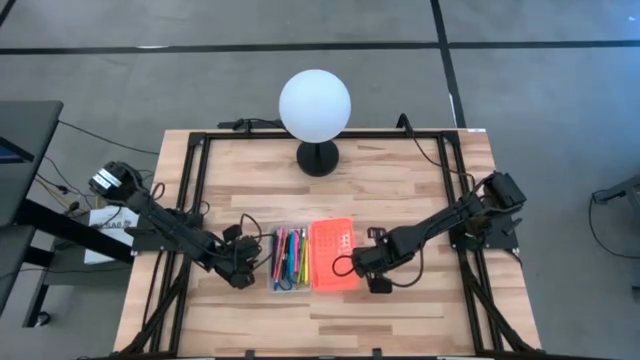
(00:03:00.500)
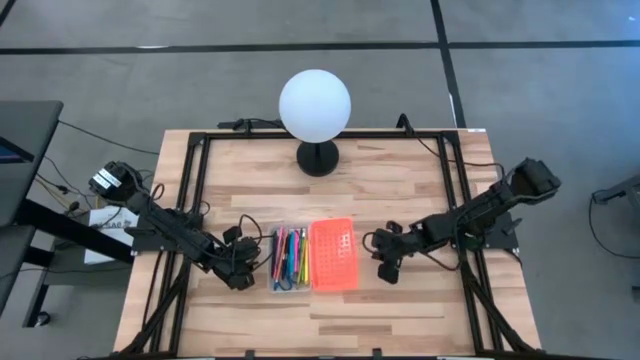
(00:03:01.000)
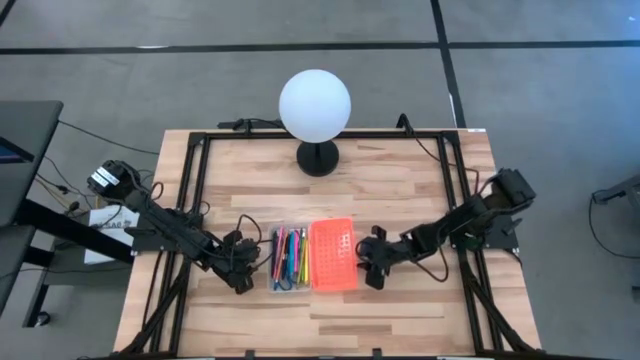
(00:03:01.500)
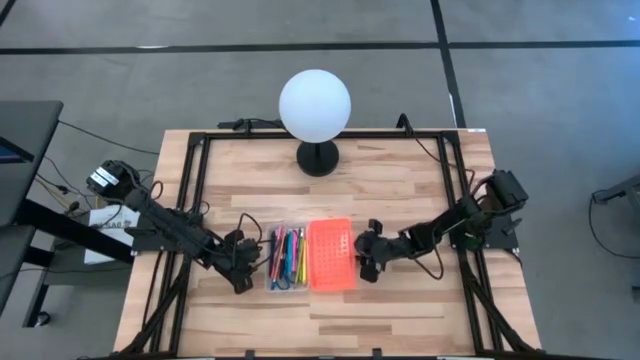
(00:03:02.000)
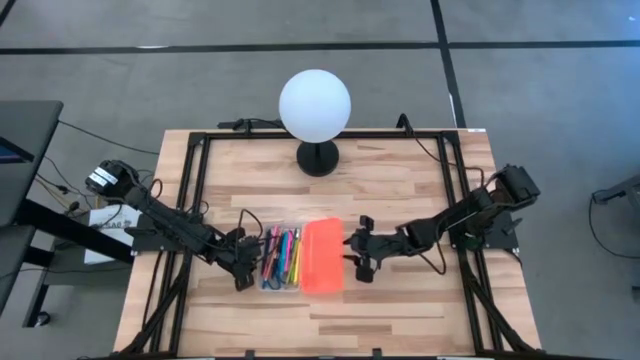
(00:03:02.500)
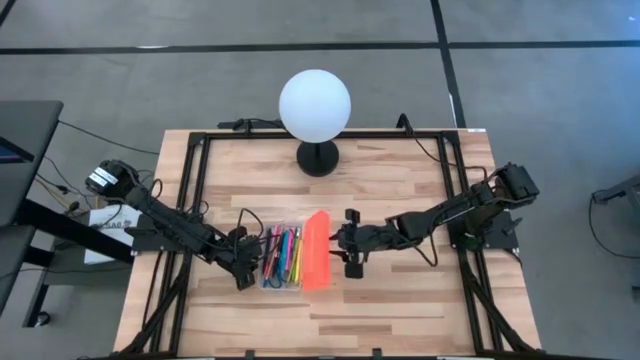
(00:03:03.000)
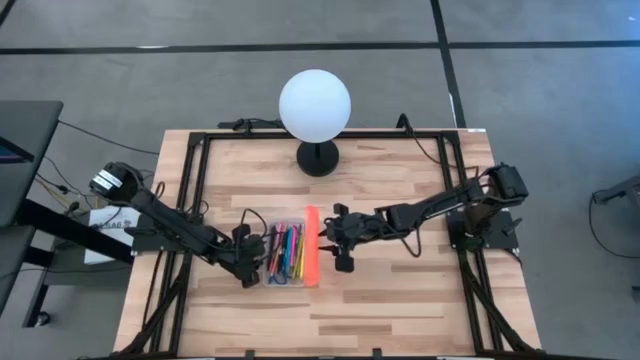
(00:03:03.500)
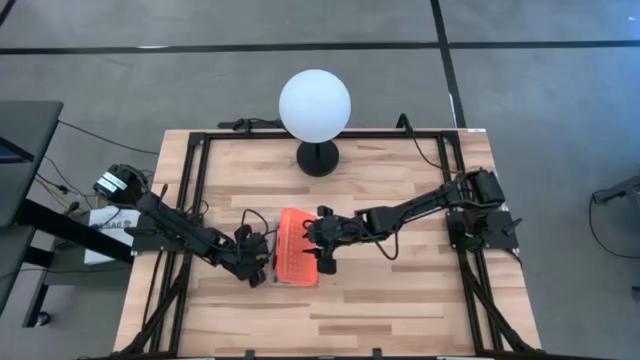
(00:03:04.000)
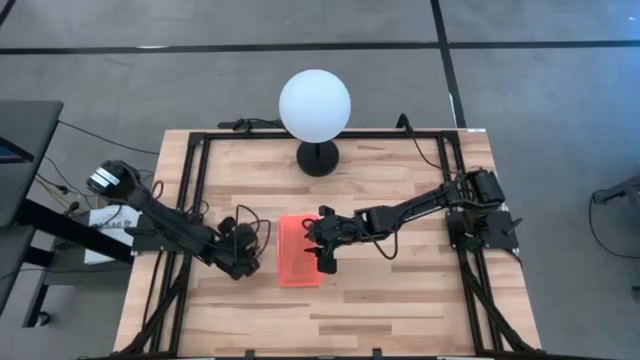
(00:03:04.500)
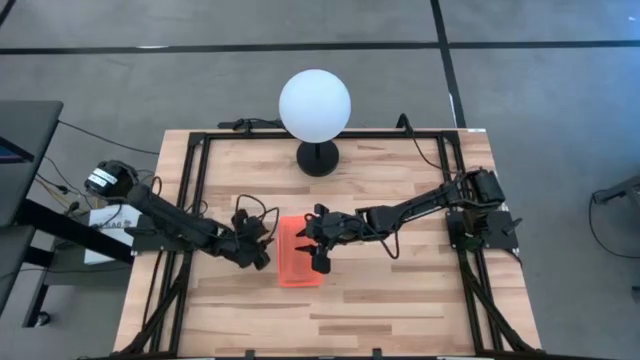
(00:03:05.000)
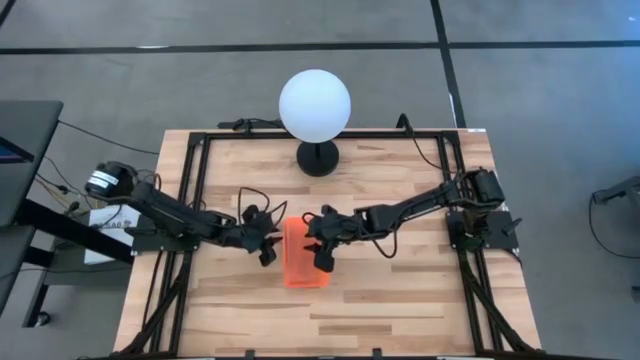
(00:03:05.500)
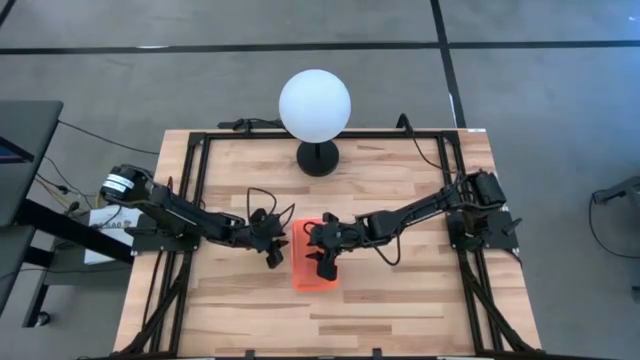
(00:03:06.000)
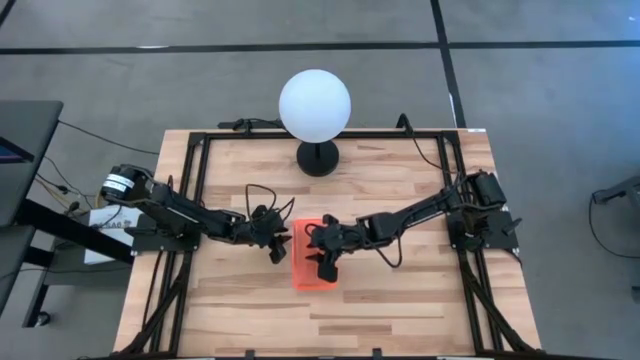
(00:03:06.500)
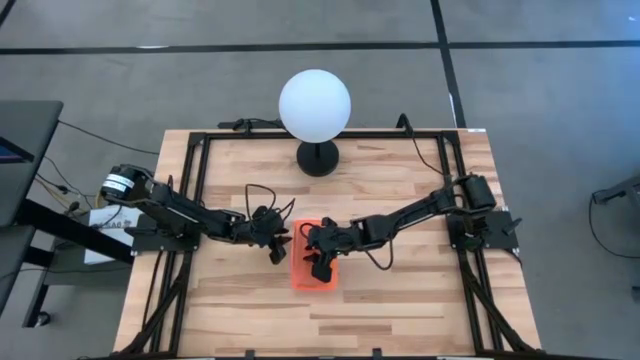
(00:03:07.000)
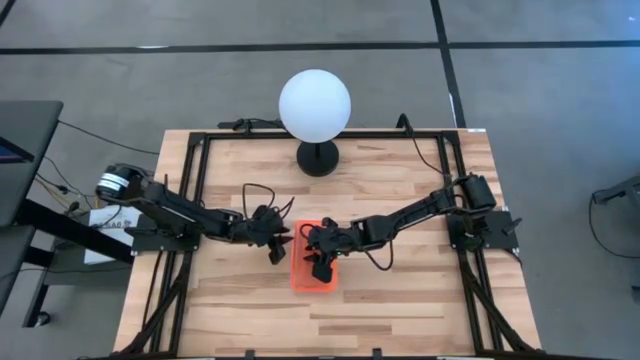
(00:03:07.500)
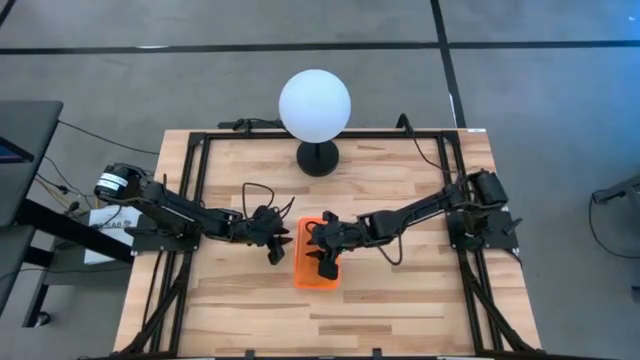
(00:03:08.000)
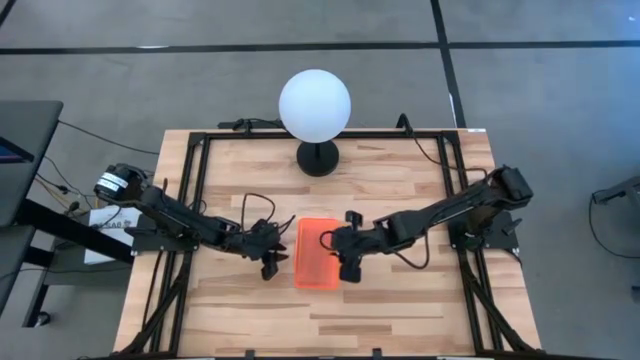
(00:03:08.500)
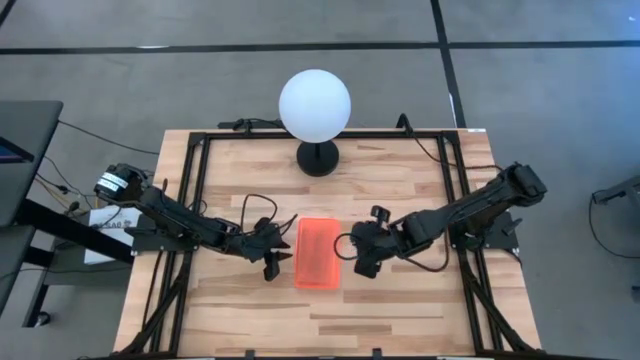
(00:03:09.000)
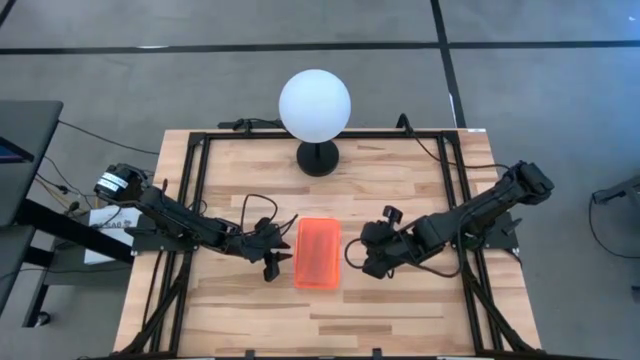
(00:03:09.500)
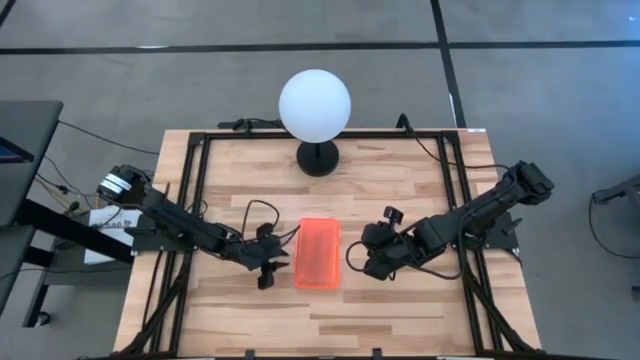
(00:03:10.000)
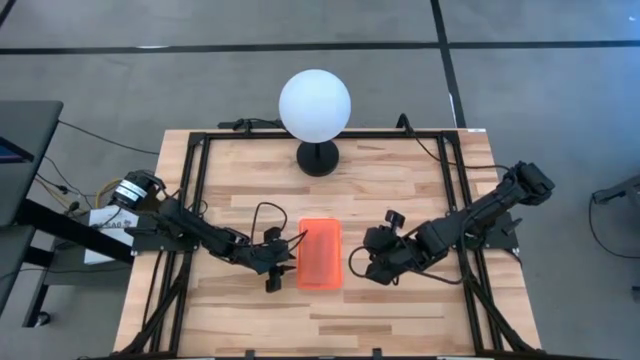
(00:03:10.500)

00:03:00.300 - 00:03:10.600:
Task: Pick & place school supplies into a supply box
Close the orange supply box

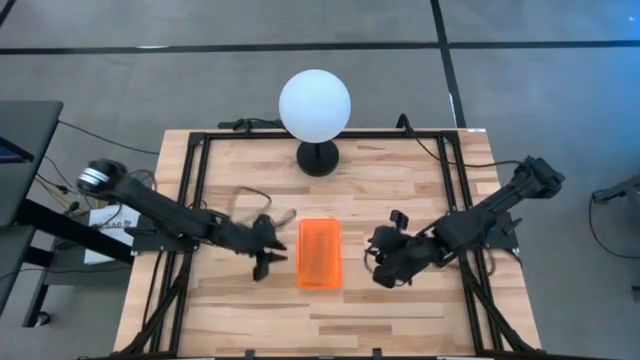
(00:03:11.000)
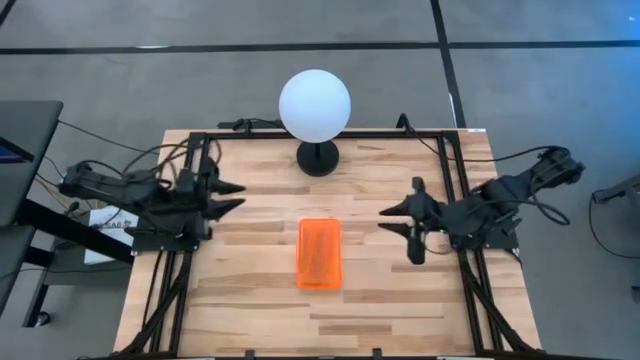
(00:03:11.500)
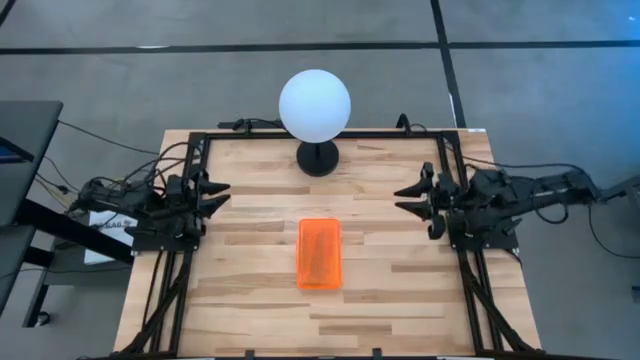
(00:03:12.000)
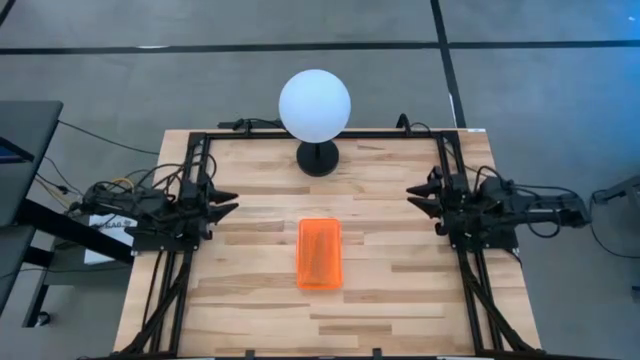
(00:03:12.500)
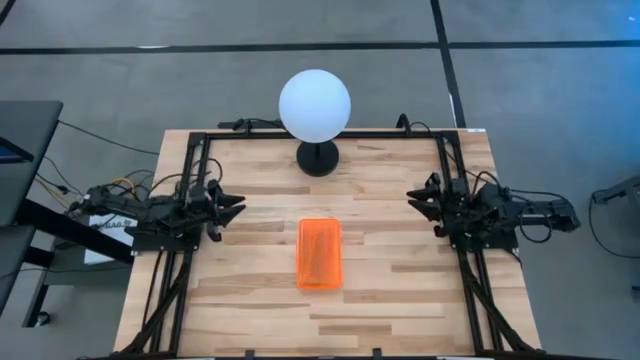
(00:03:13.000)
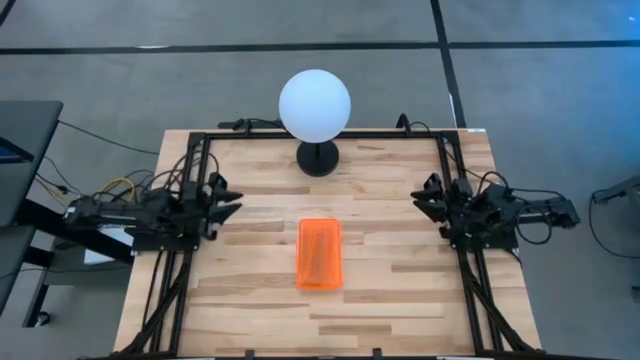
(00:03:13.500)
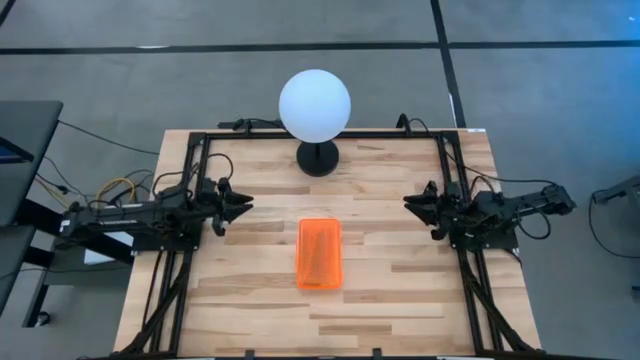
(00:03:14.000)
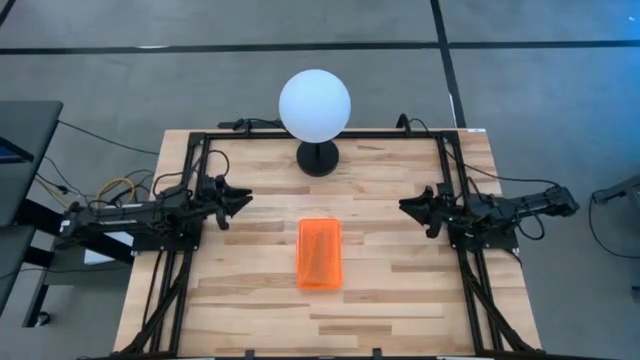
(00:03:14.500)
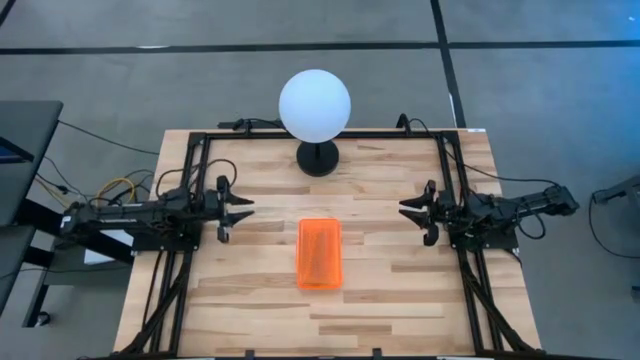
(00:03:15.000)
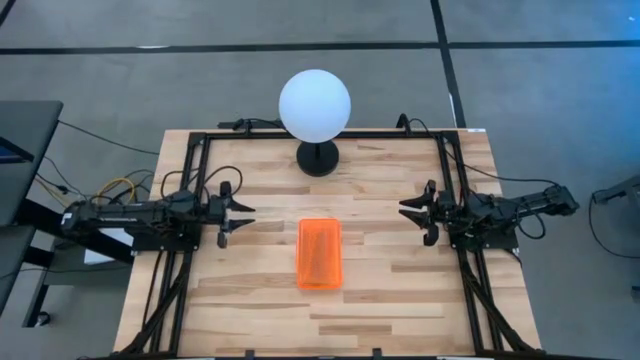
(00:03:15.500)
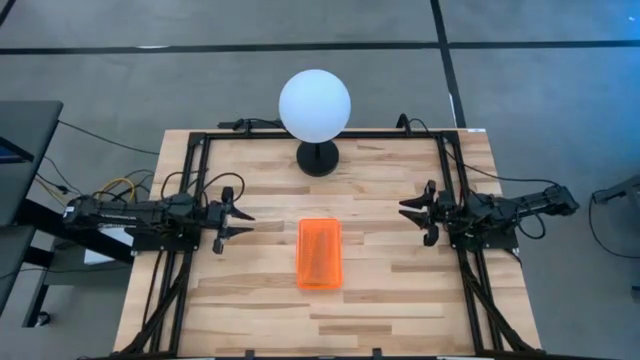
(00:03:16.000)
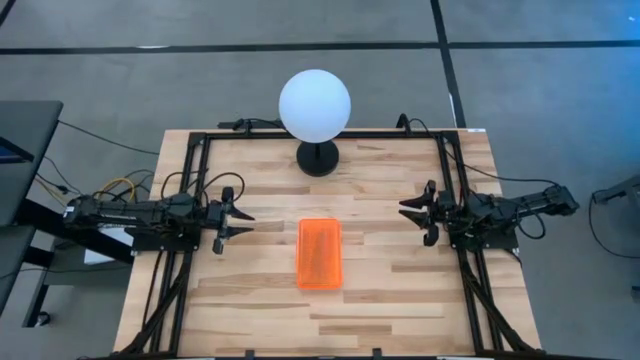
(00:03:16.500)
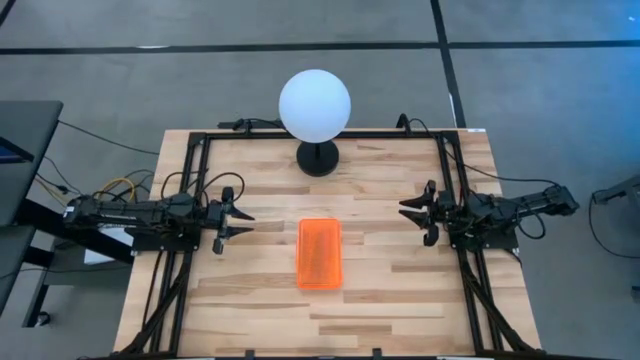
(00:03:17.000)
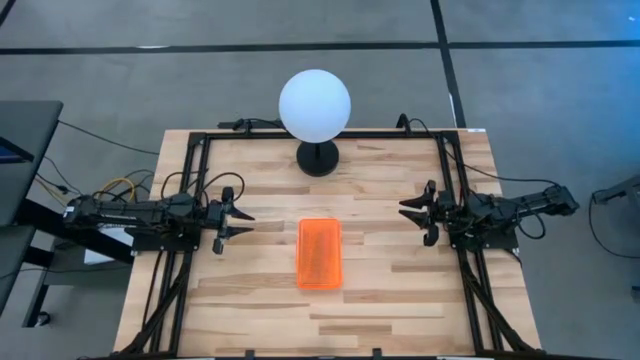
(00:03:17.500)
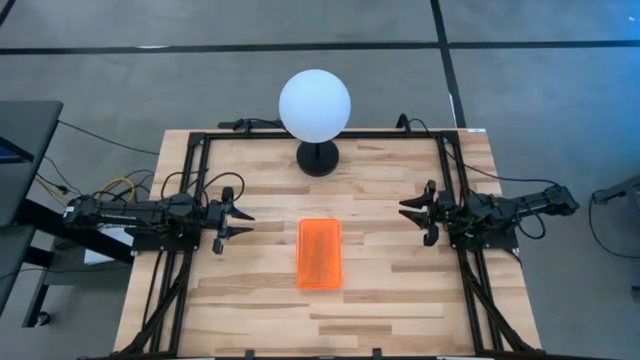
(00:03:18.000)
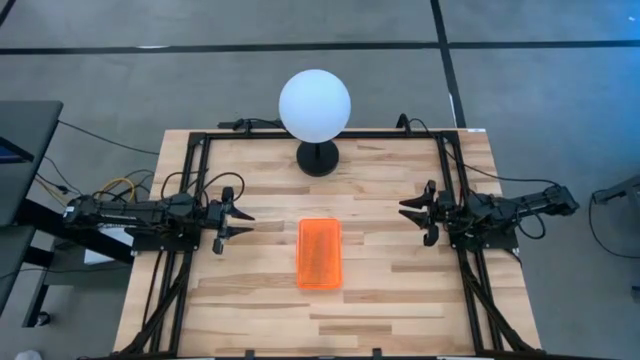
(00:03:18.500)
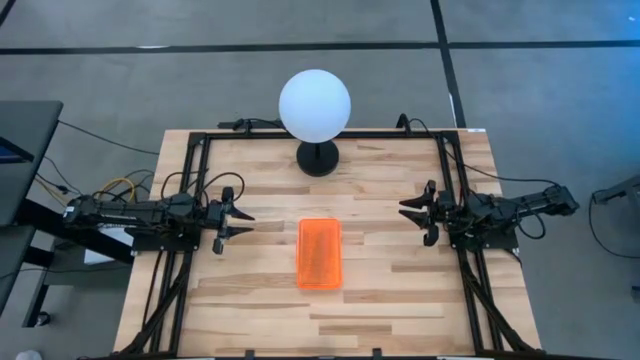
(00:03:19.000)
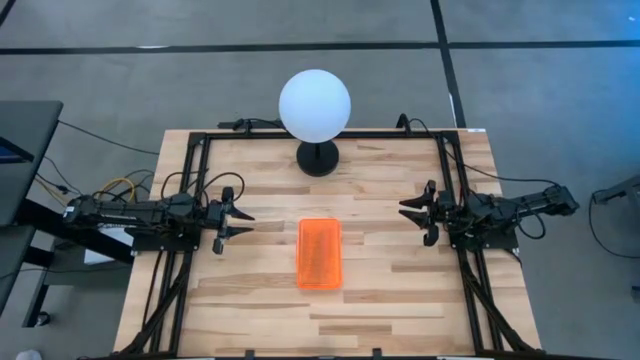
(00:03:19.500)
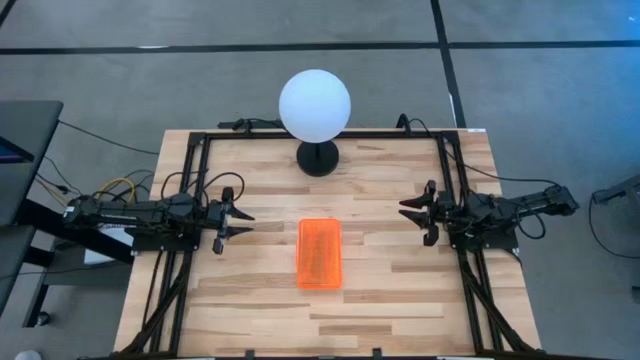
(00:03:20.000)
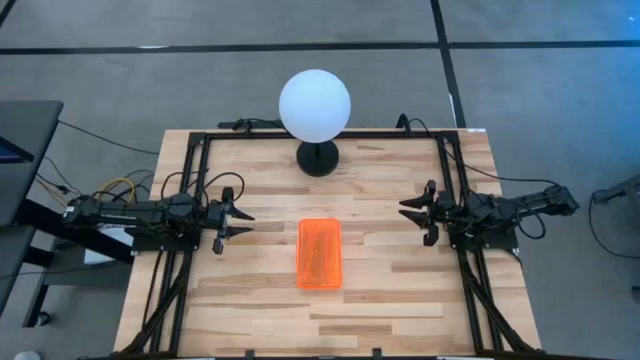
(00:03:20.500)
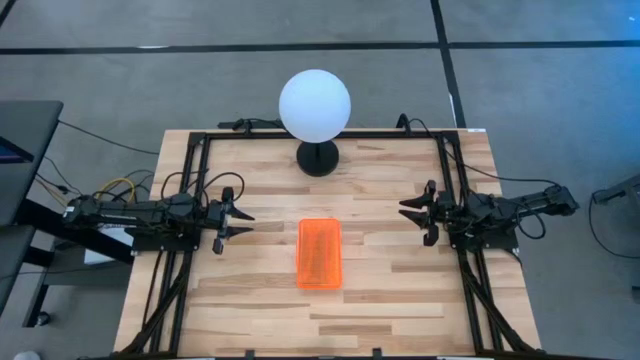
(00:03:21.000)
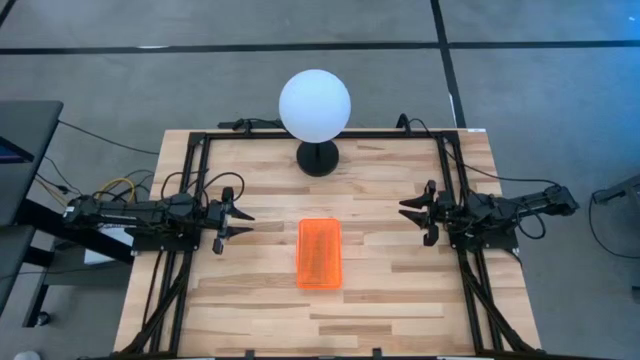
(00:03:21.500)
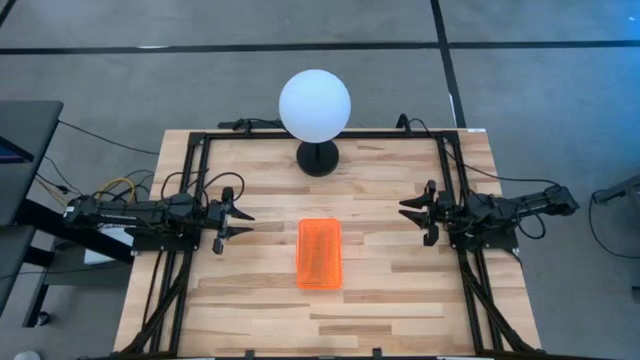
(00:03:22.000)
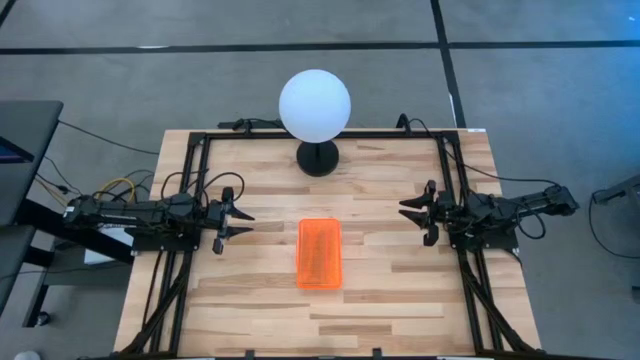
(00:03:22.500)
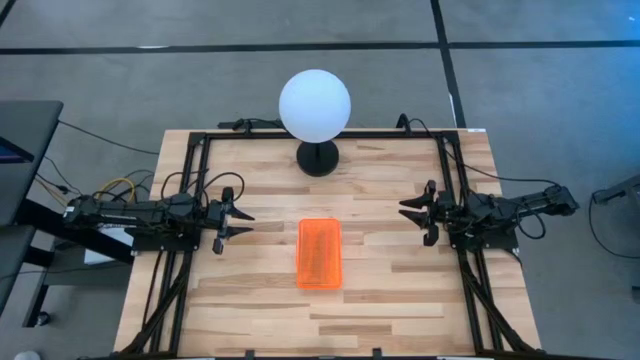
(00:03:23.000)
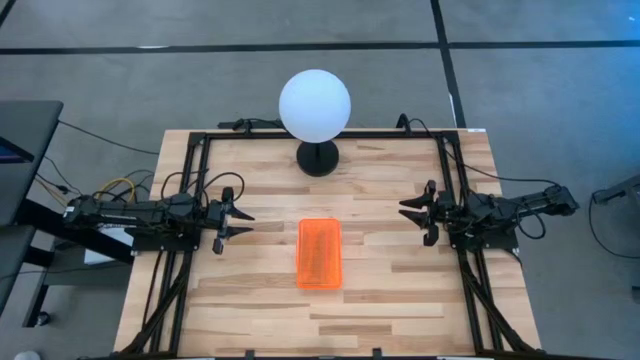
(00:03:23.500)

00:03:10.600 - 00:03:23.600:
Return to Home Position
